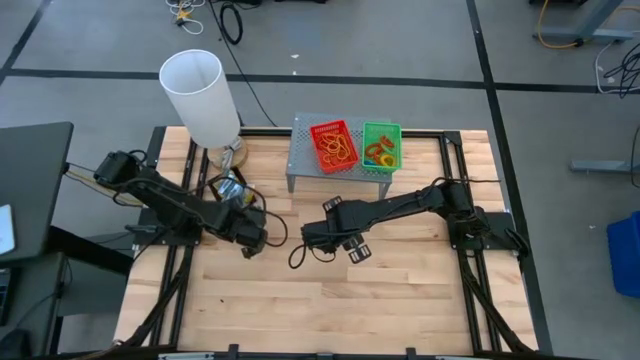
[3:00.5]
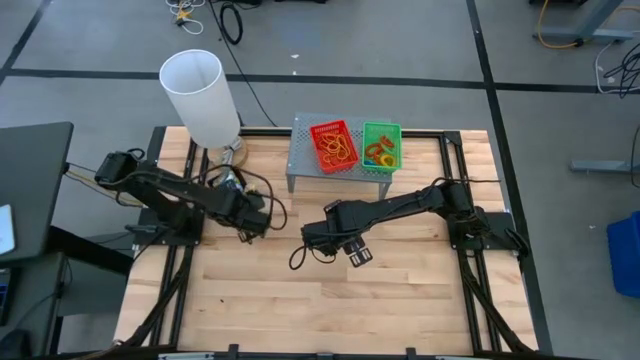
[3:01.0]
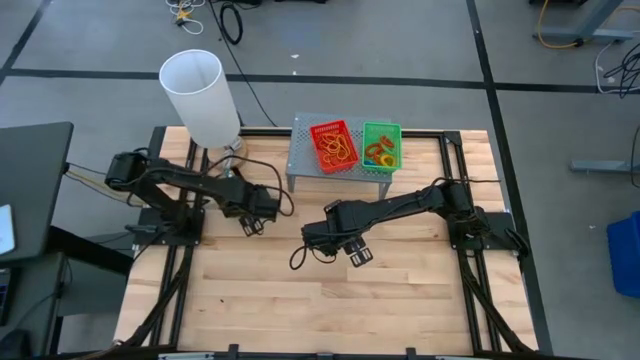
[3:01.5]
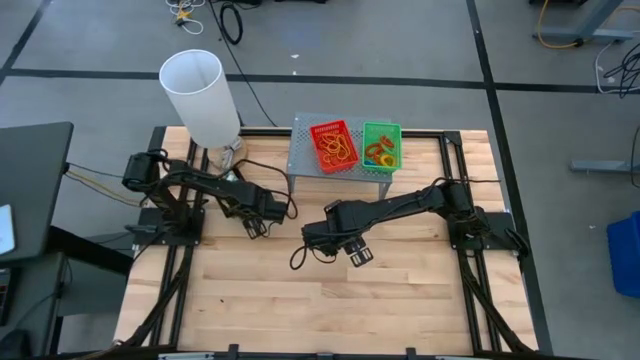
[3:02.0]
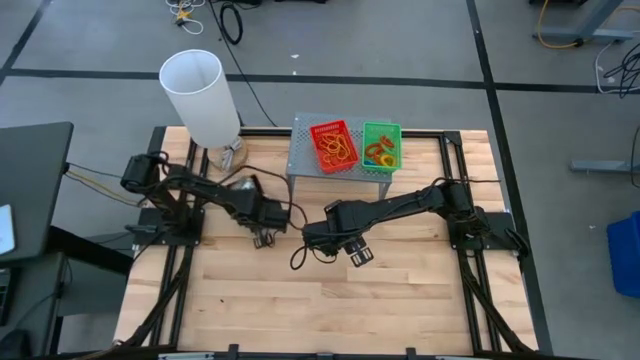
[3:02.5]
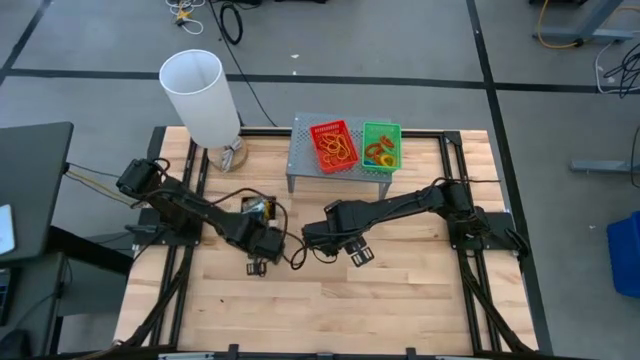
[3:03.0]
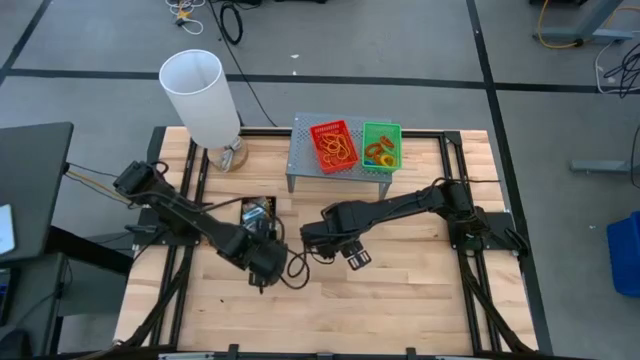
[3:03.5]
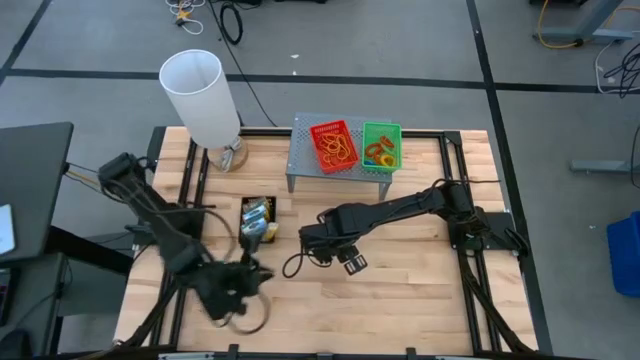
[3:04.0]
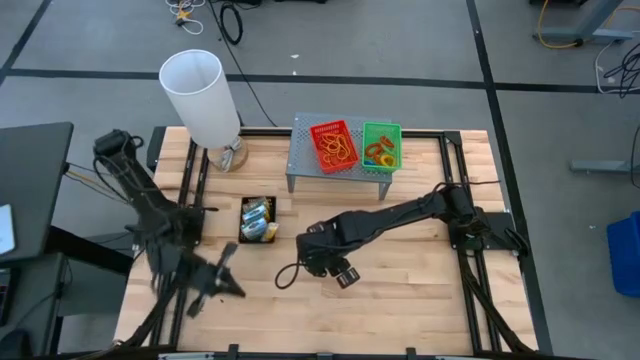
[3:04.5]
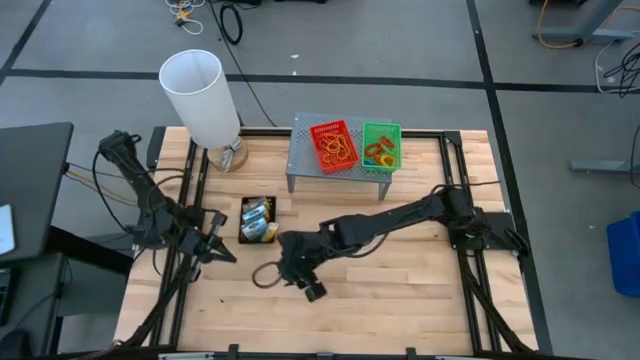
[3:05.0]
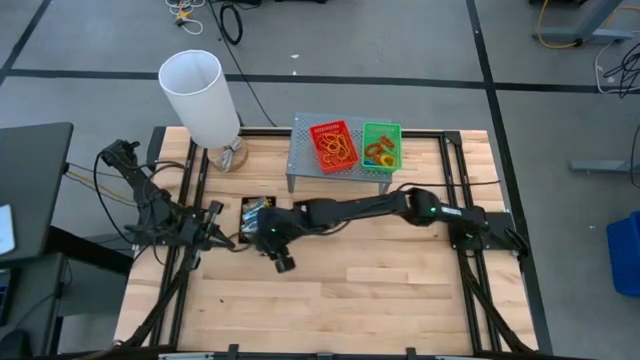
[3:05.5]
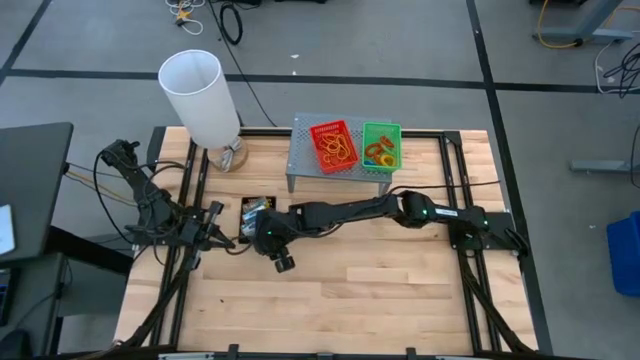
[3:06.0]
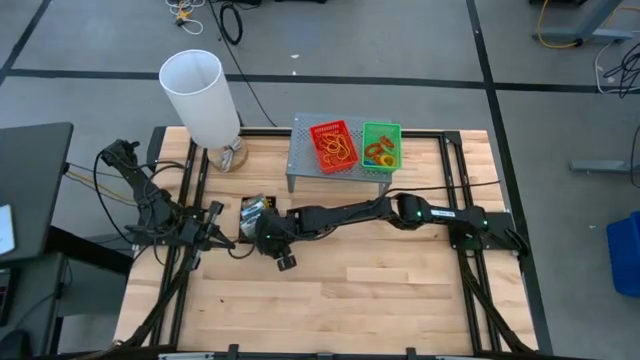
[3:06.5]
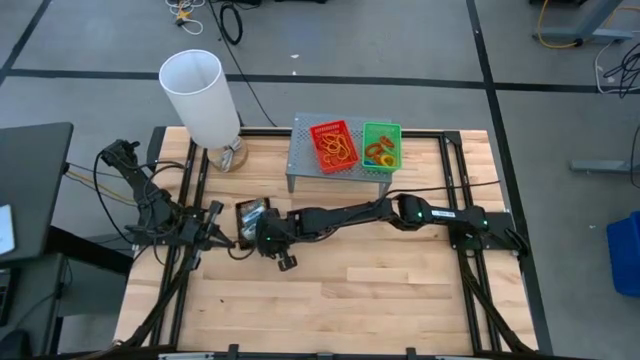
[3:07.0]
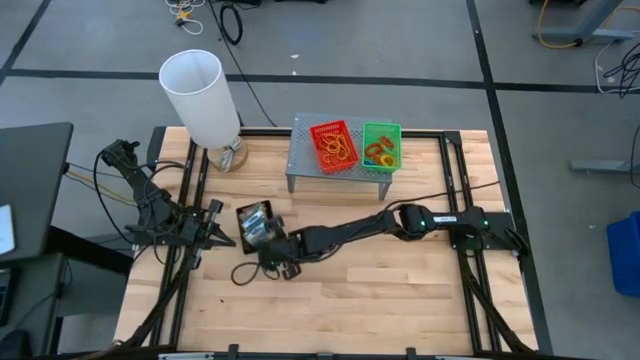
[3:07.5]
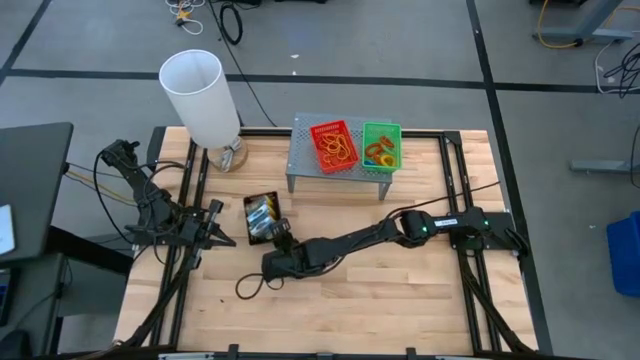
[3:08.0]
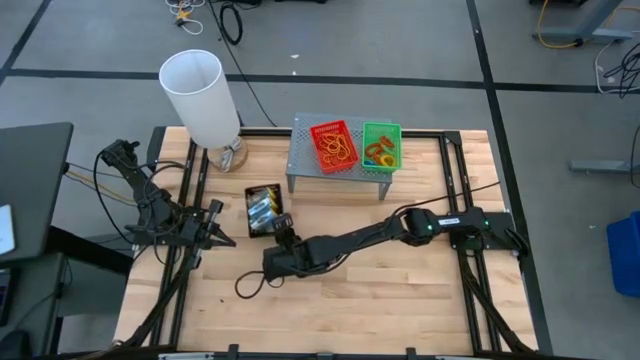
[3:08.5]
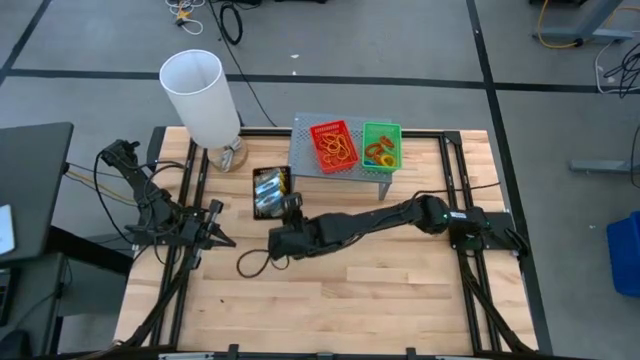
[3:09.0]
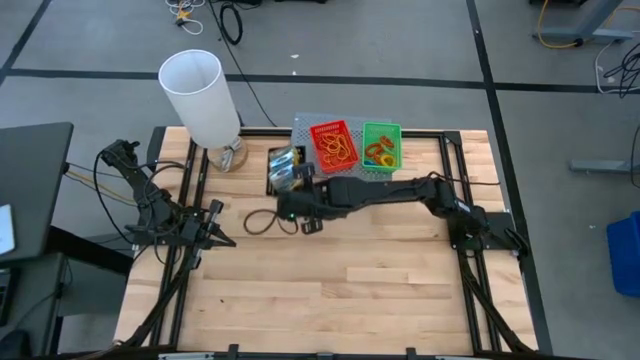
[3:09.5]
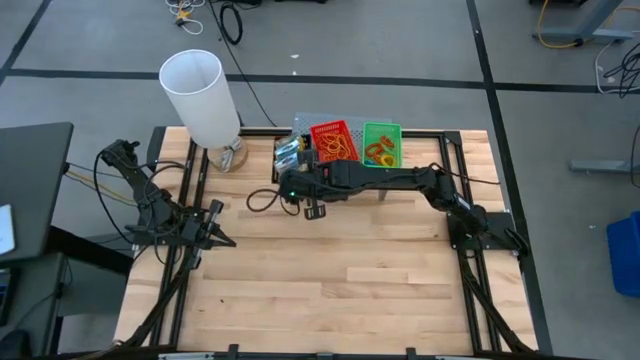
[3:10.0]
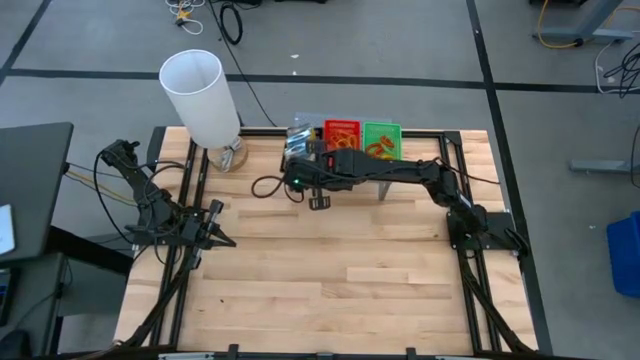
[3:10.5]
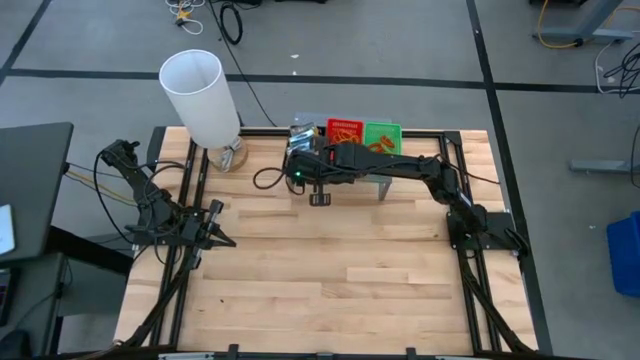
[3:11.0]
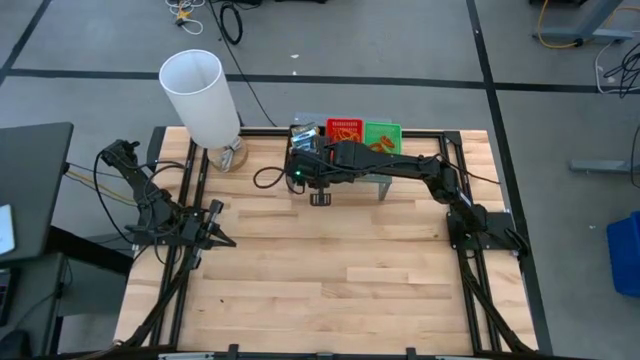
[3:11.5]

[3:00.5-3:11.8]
Task: Pick & Place Office Desk Supplies
Put the black bin on the shelf

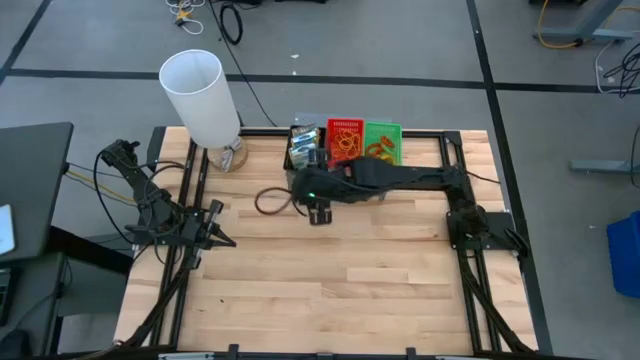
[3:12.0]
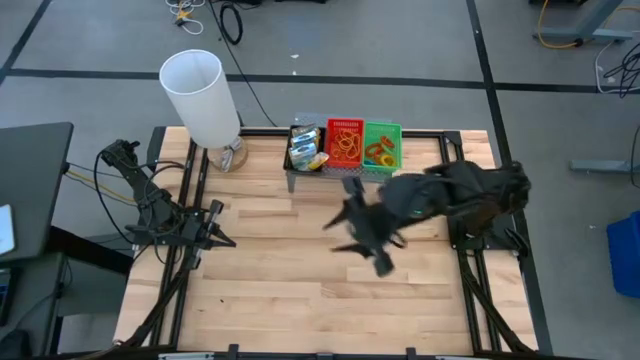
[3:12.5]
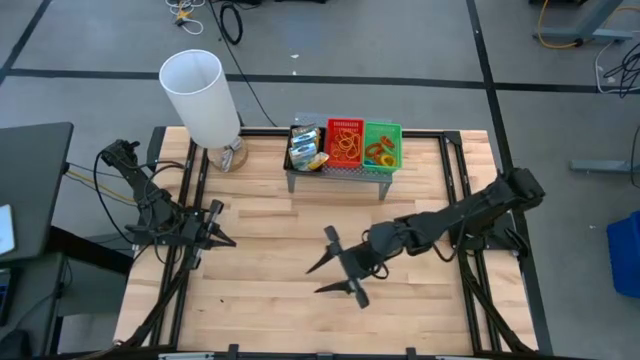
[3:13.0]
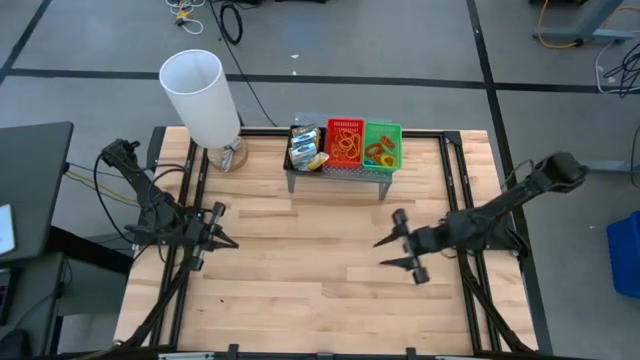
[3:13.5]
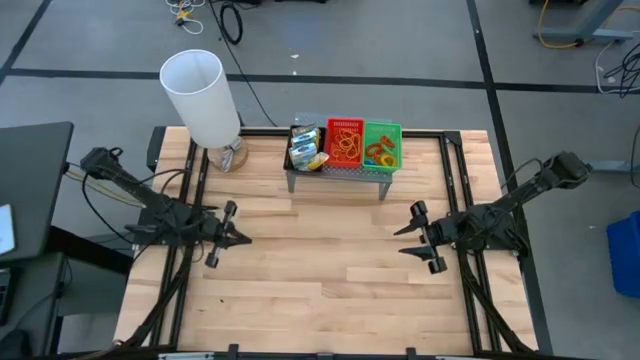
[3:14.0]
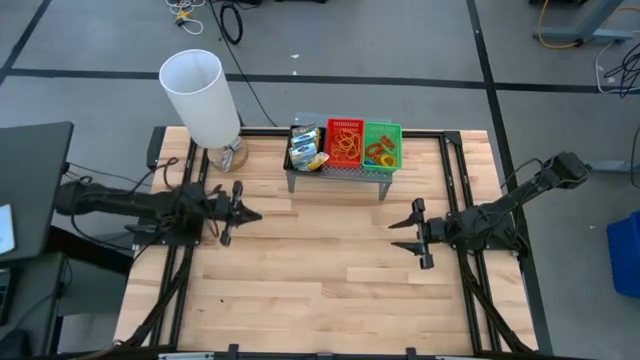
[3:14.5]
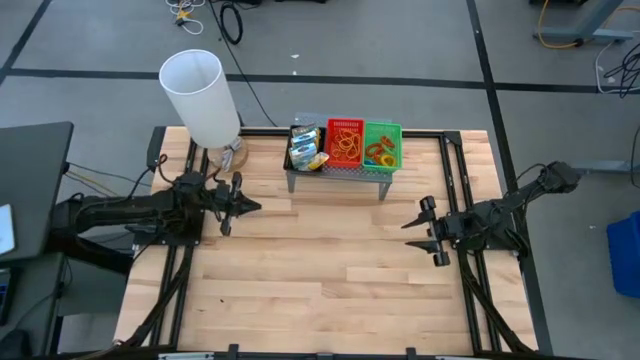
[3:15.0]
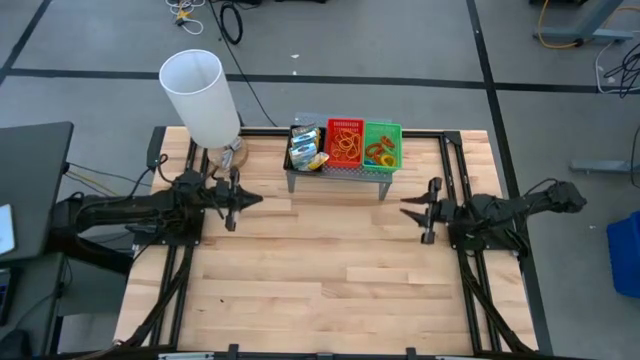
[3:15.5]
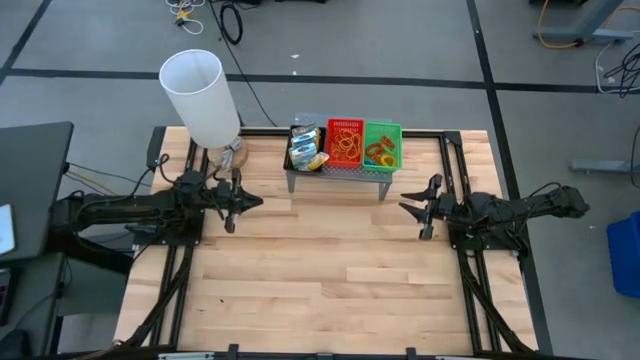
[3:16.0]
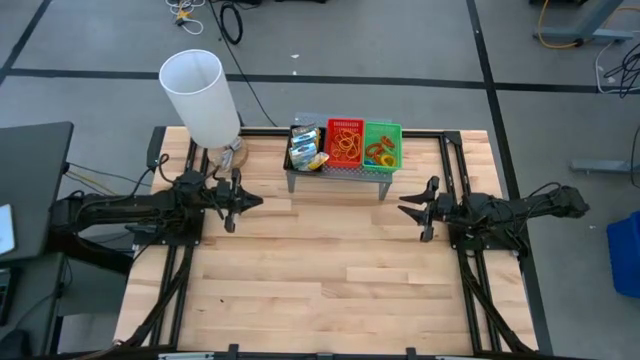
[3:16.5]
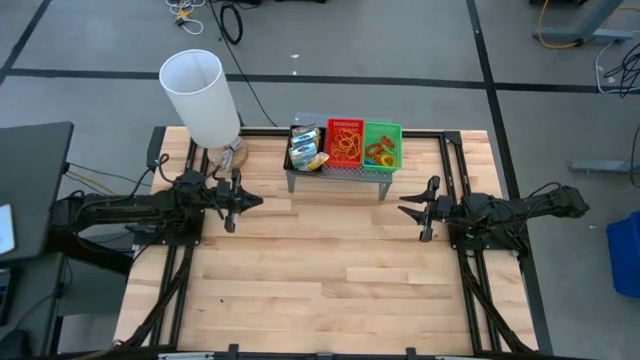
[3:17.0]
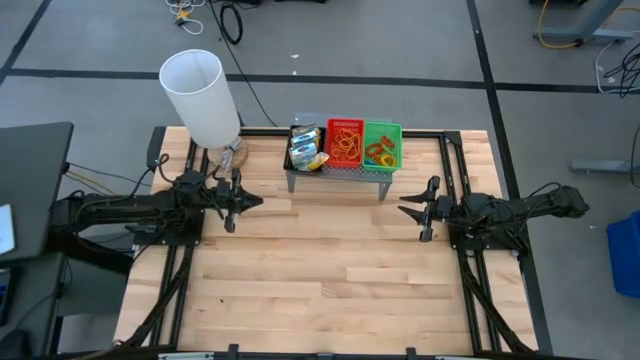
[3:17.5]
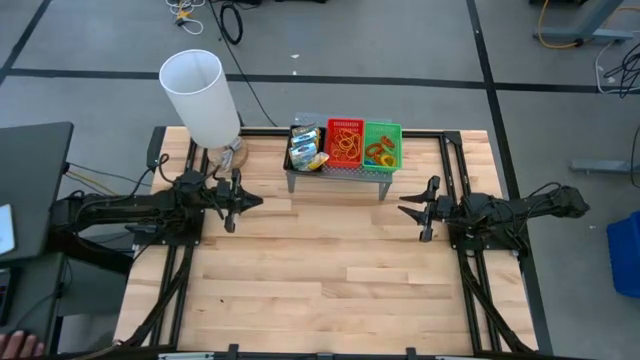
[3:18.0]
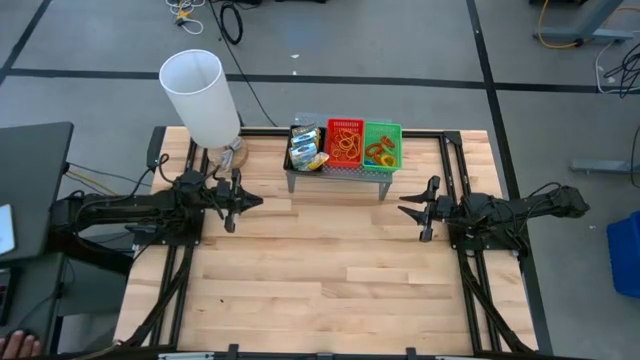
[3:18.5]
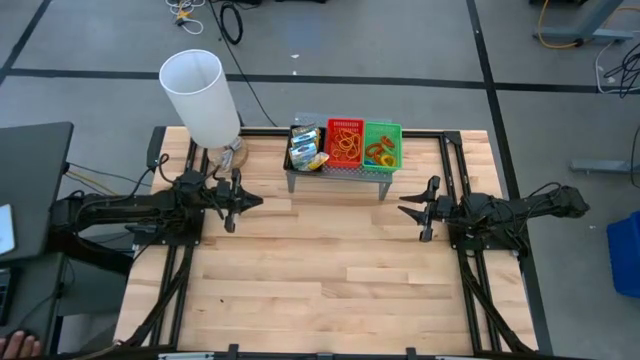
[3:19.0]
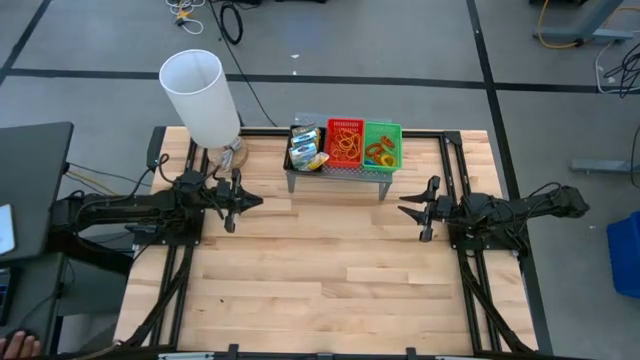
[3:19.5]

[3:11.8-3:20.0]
Return to Home Position

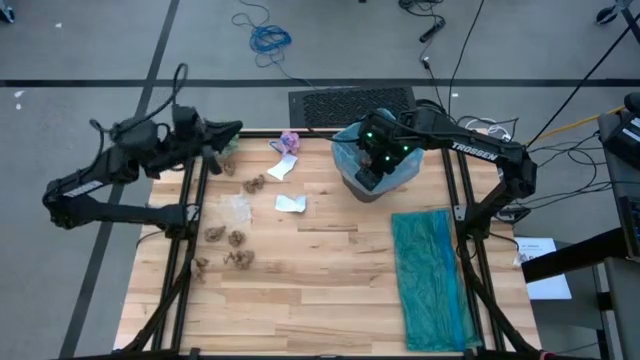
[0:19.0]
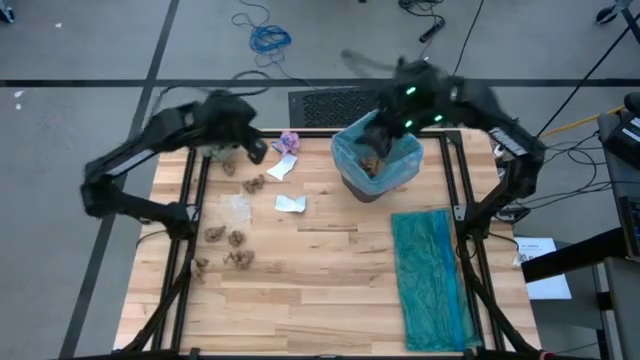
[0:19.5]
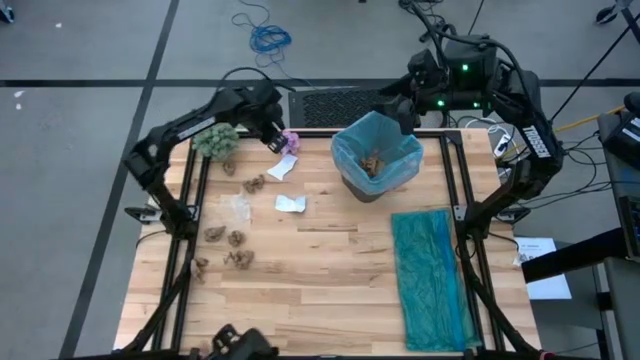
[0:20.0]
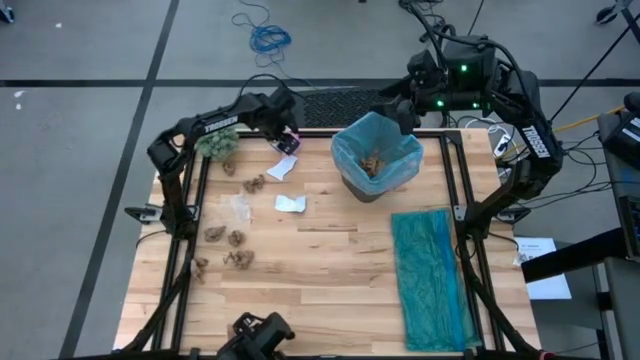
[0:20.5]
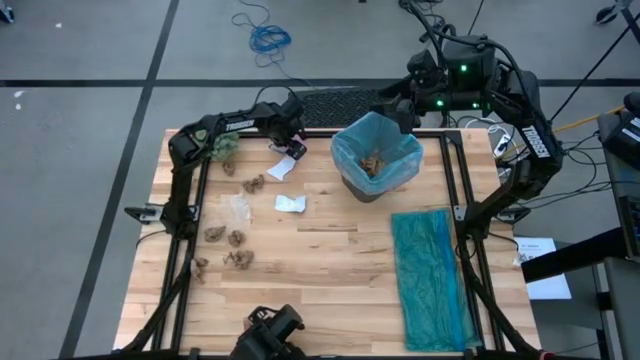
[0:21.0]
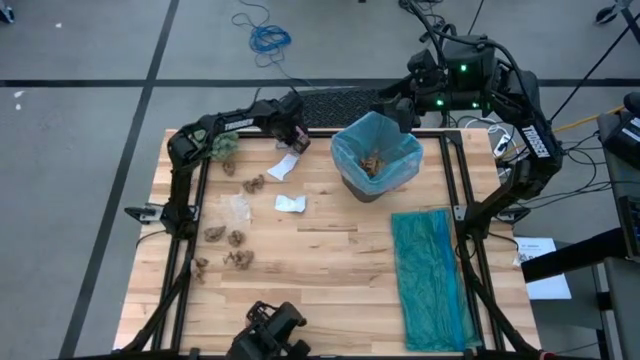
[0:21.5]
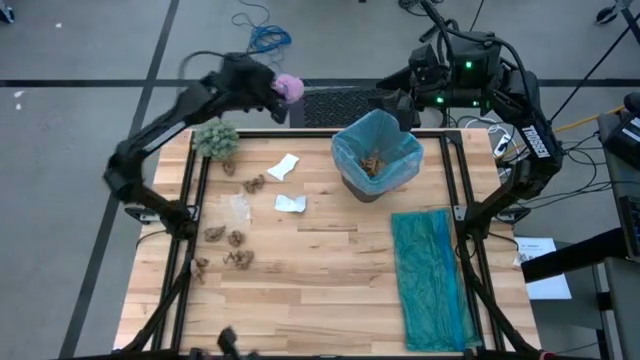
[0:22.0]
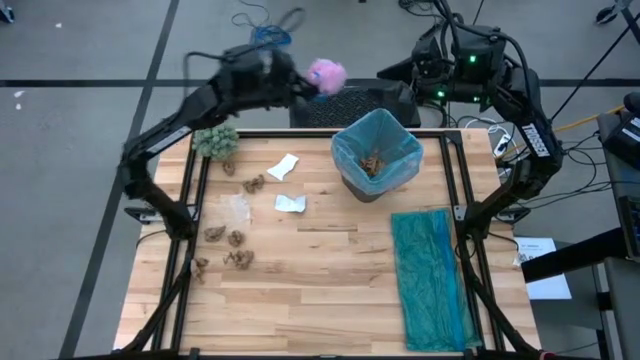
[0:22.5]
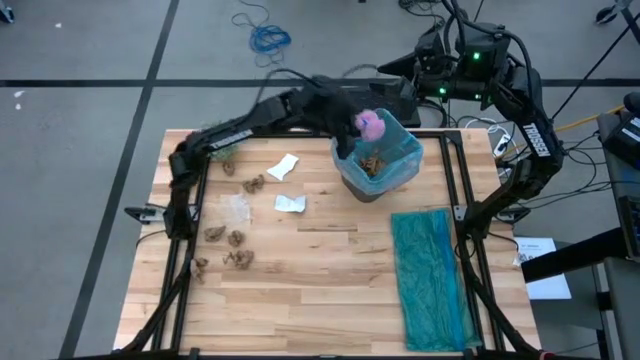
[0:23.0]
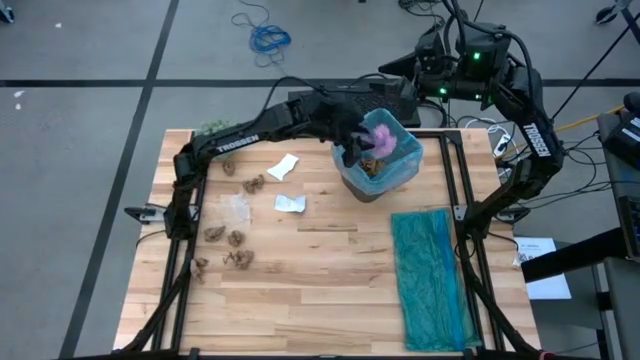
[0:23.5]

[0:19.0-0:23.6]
Task: place trash/remove bag and relplace
Put the pink trash bag into the trash bin
